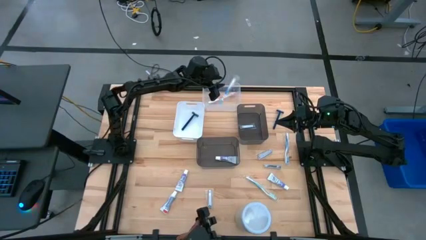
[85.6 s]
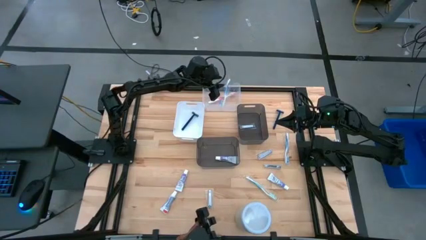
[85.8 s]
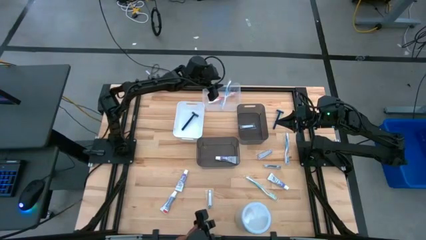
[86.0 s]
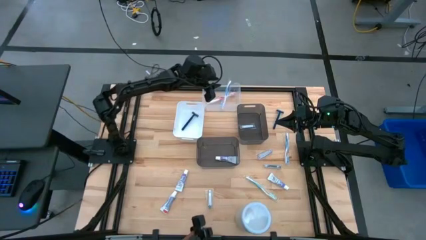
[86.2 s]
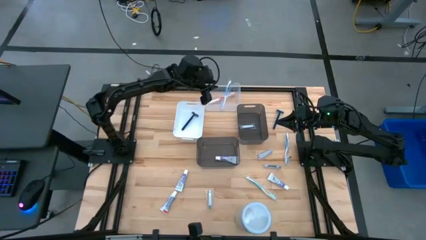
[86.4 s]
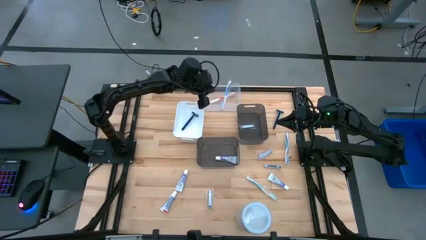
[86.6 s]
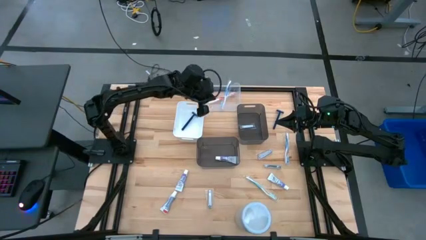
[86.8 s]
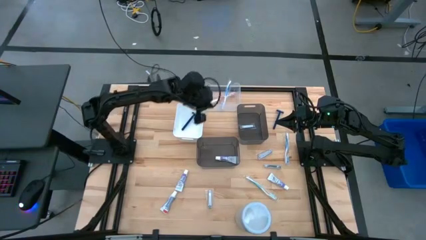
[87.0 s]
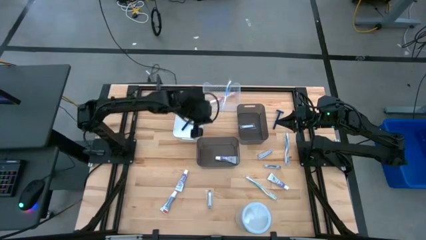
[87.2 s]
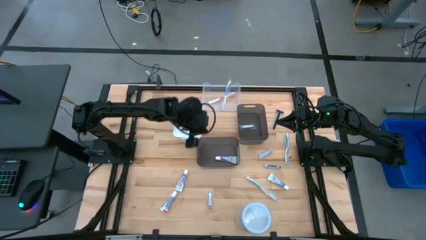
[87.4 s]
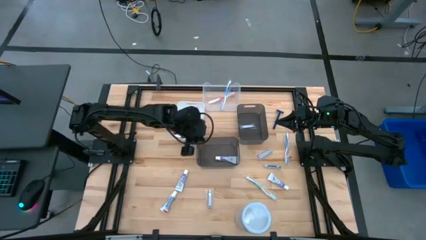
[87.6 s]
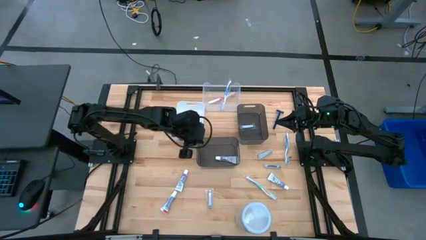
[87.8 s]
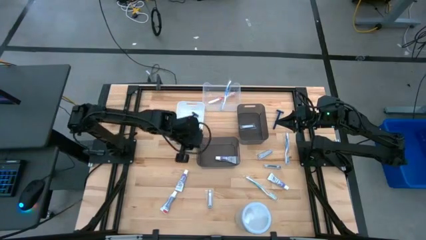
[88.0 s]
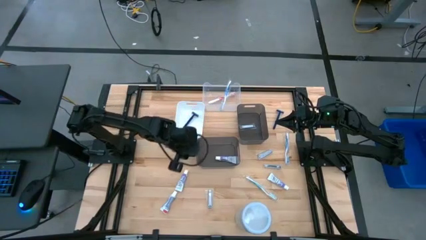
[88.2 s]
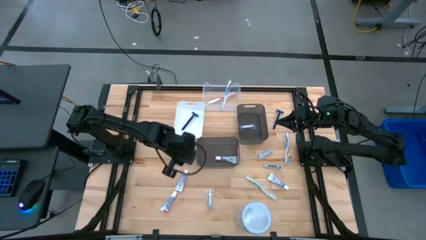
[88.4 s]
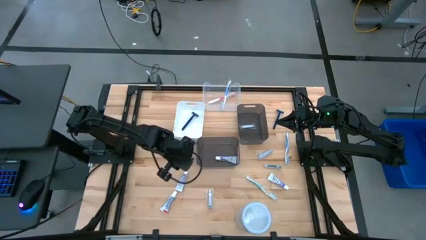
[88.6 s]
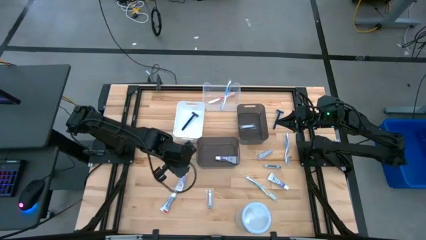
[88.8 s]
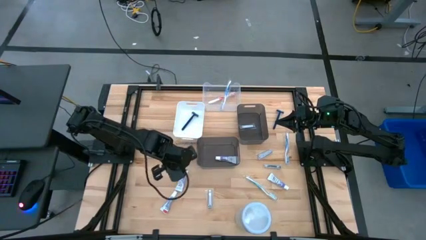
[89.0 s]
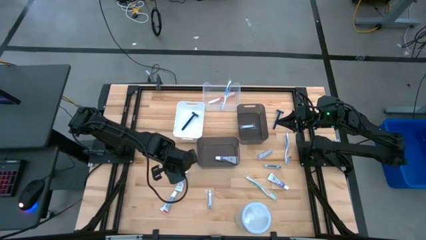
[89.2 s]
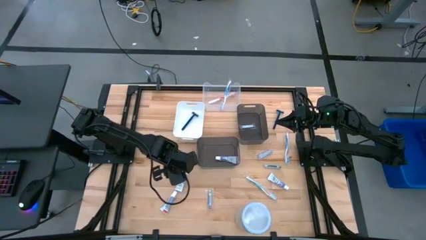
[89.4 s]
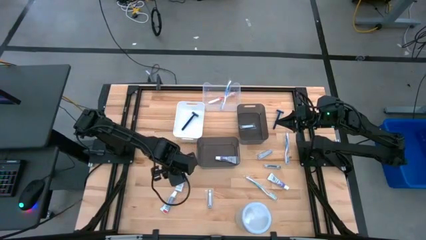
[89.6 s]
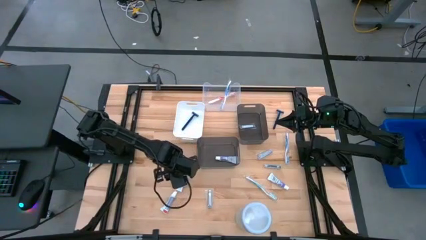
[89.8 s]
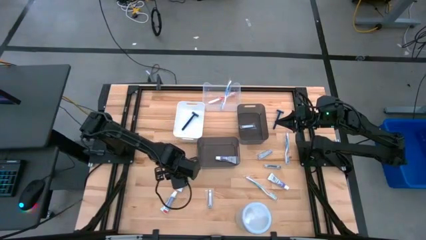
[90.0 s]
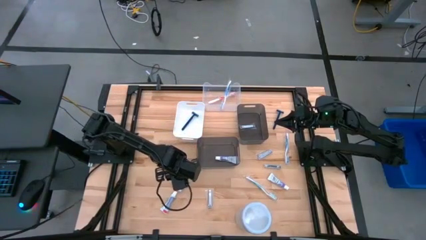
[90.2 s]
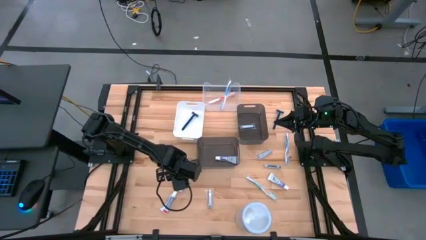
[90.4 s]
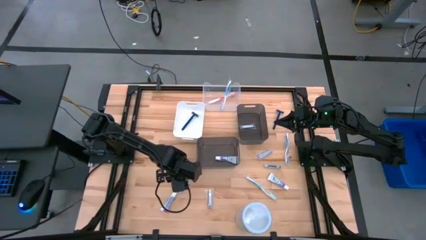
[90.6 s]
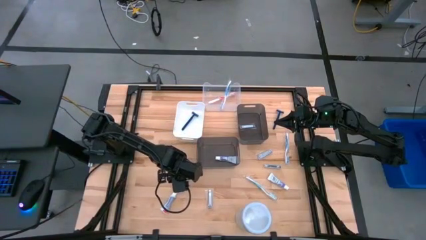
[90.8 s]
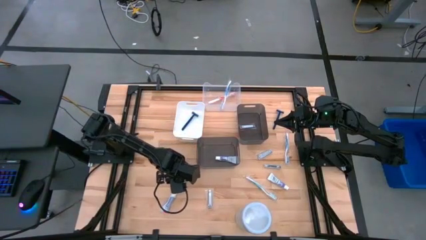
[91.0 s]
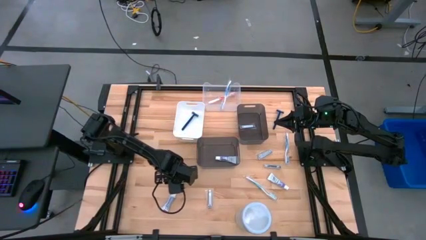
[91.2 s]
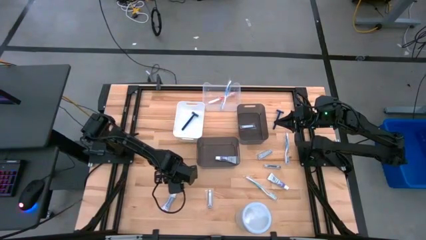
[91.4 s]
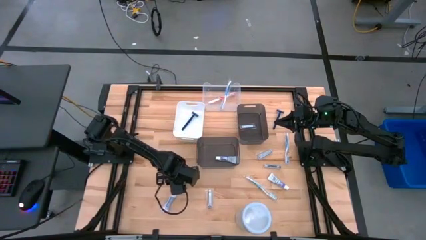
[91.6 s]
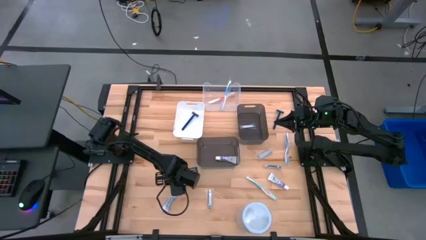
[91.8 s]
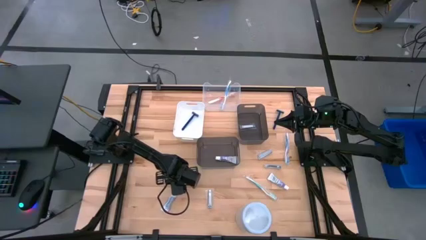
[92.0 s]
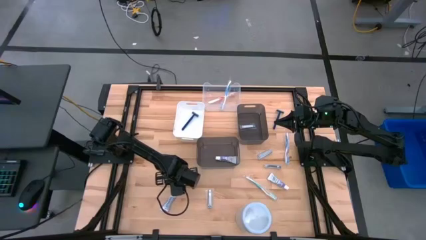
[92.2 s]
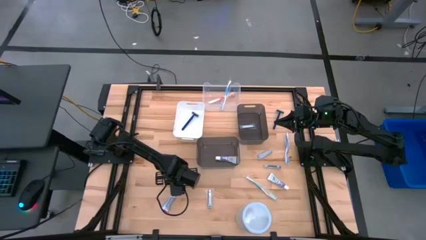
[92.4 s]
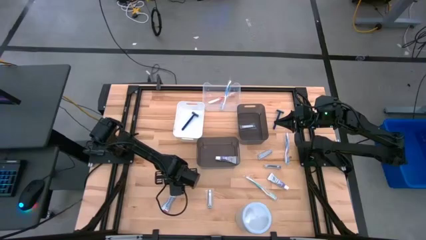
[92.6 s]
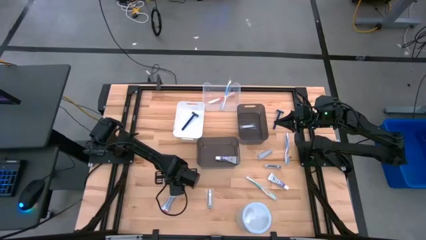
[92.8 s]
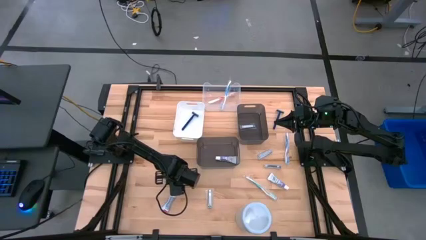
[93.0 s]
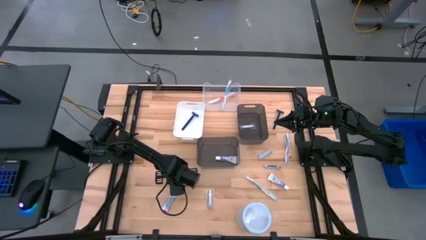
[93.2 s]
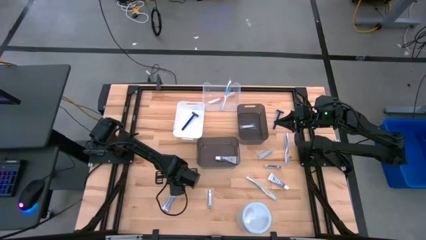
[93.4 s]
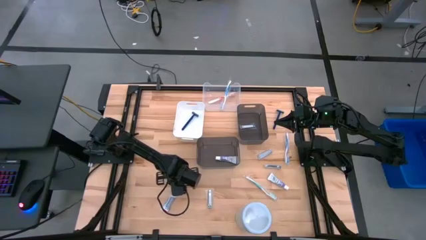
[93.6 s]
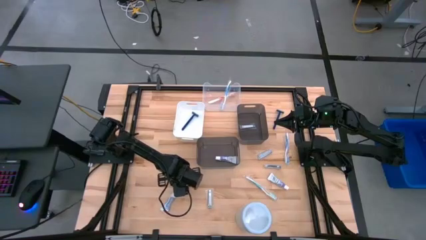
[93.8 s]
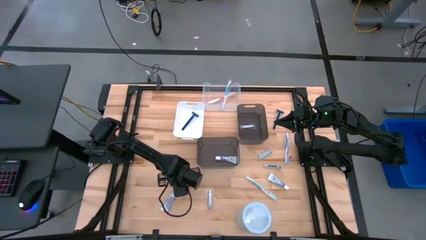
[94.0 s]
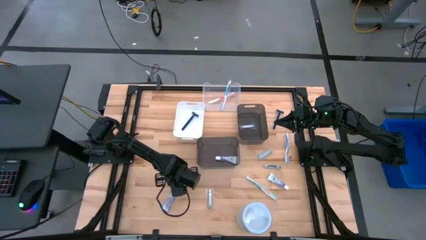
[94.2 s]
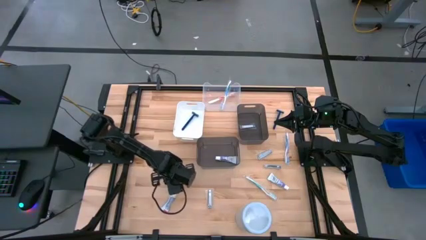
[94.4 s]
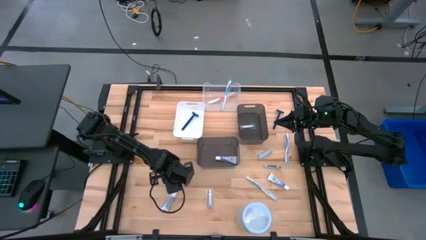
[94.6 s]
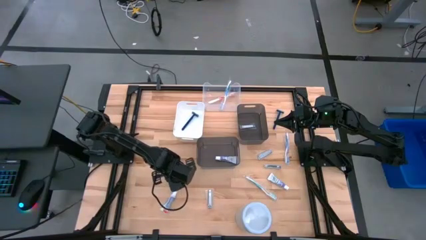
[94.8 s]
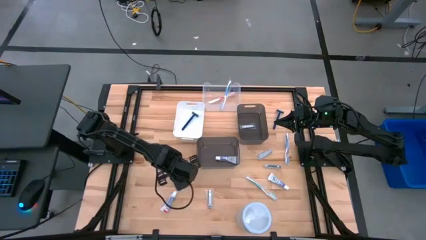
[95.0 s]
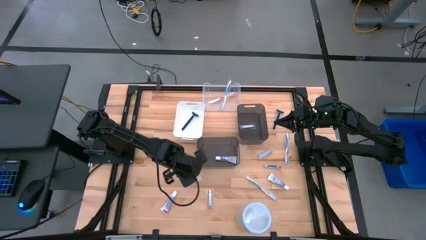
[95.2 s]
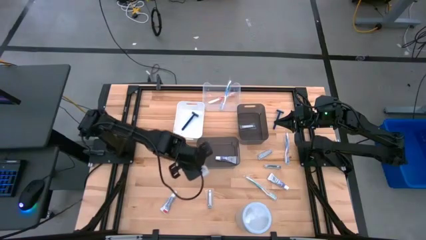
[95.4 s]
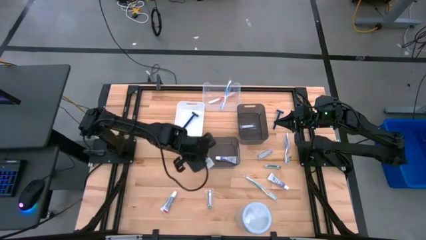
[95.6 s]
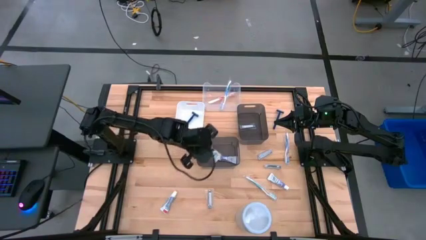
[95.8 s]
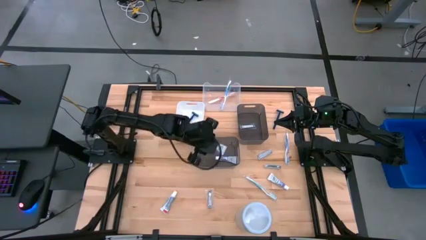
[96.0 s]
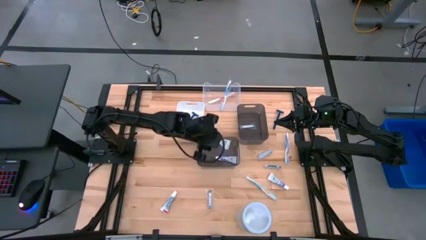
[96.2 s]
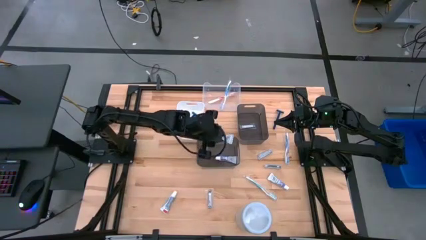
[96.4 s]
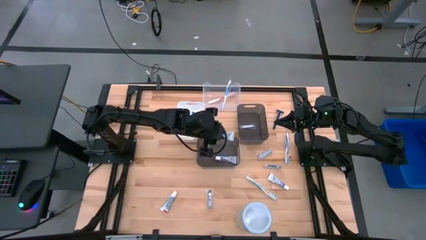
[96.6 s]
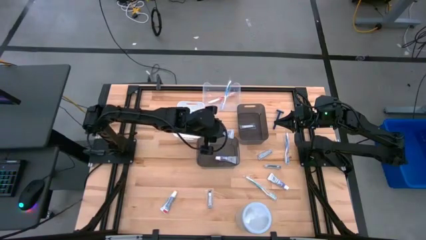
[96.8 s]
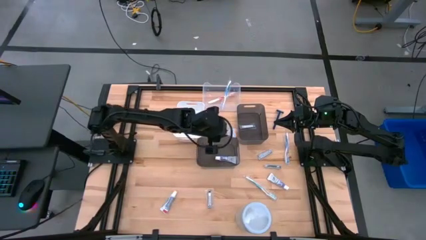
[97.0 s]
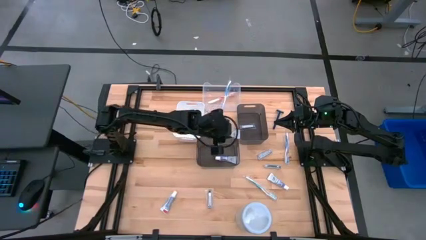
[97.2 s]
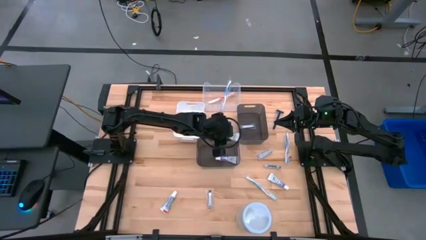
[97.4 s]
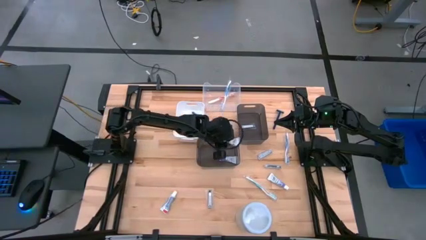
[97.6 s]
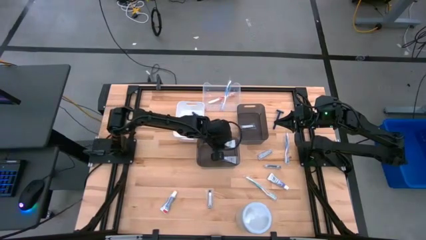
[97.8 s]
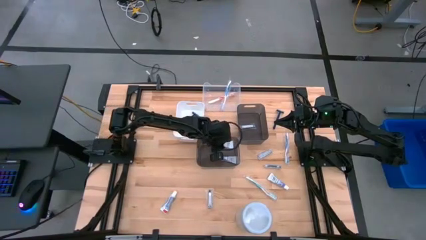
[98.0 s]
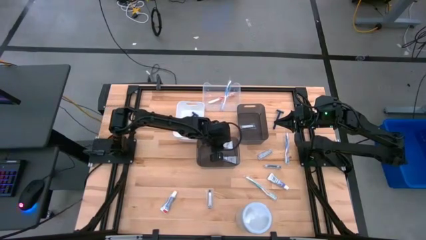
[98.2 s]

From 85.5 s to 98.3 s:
Task: Pick & Place Travel size toiletries
Put the white toothpaste into the bottom black bin
